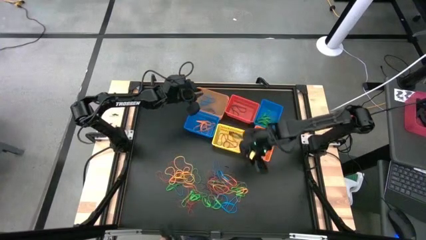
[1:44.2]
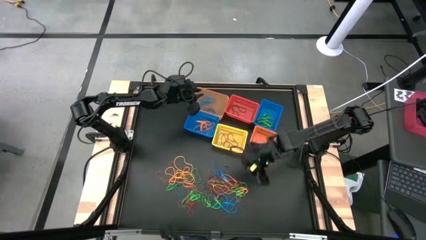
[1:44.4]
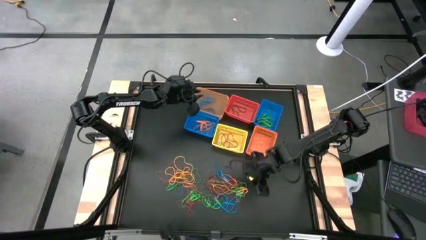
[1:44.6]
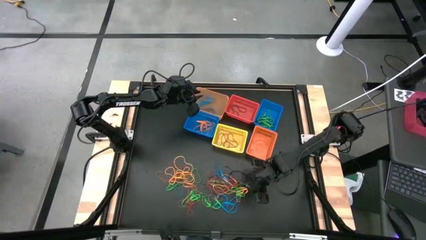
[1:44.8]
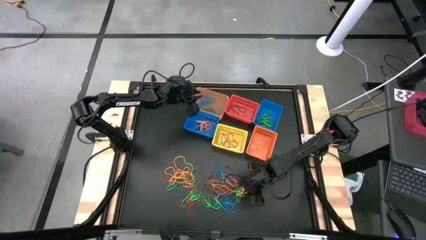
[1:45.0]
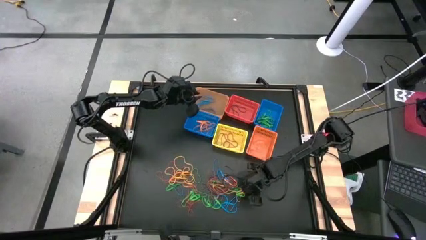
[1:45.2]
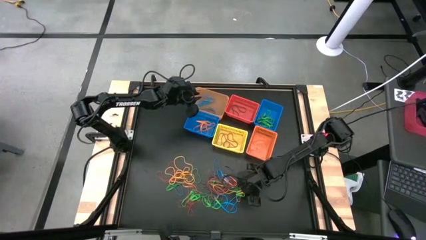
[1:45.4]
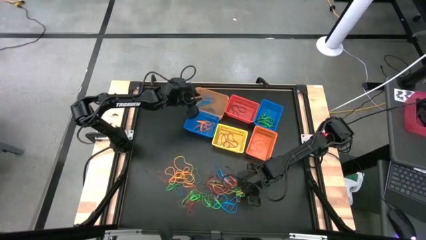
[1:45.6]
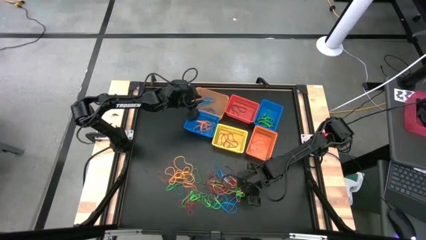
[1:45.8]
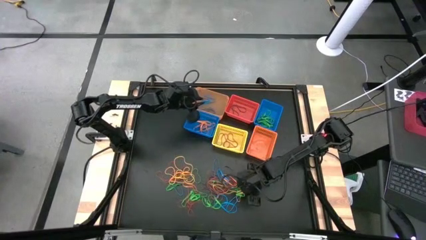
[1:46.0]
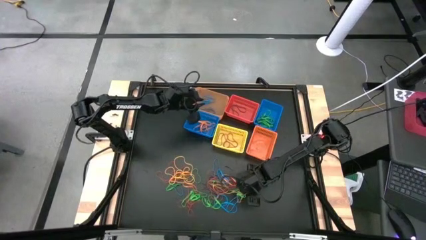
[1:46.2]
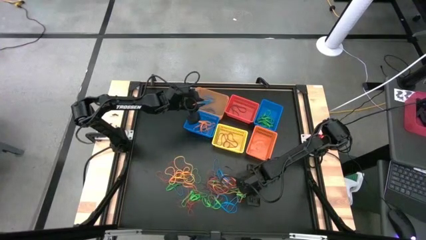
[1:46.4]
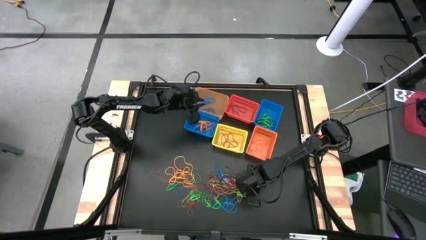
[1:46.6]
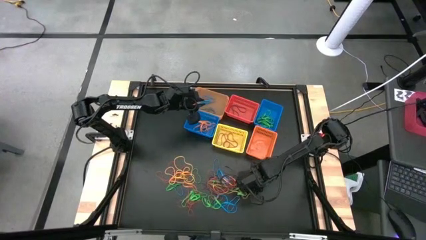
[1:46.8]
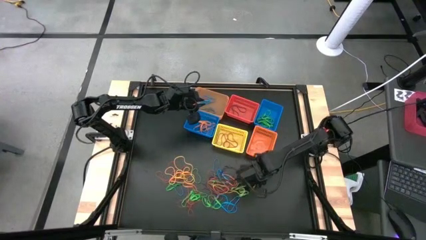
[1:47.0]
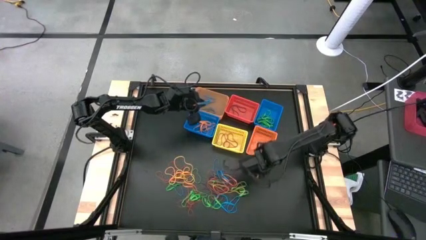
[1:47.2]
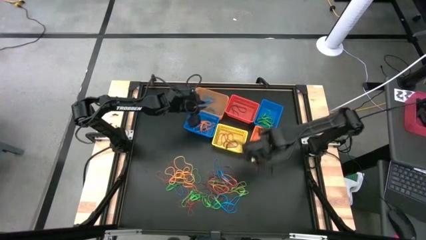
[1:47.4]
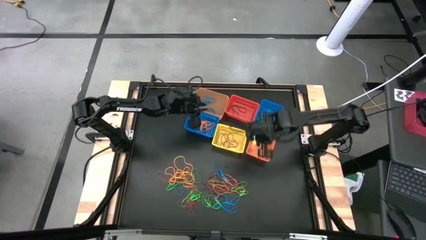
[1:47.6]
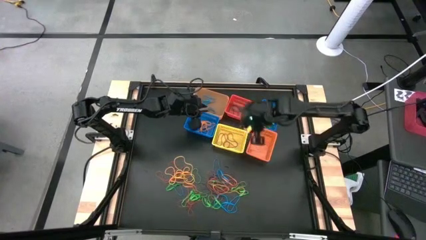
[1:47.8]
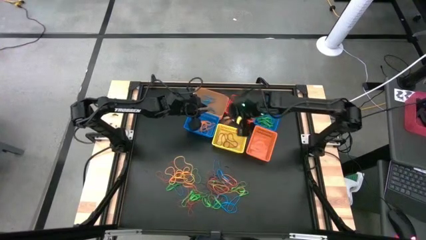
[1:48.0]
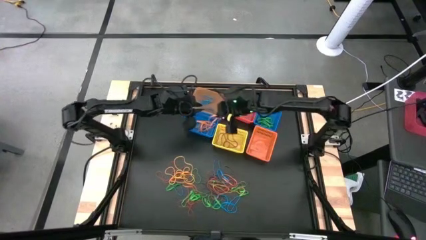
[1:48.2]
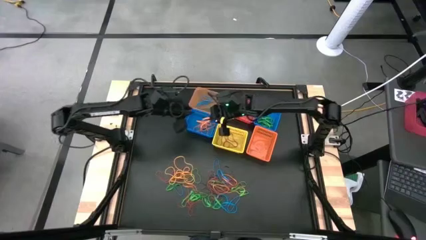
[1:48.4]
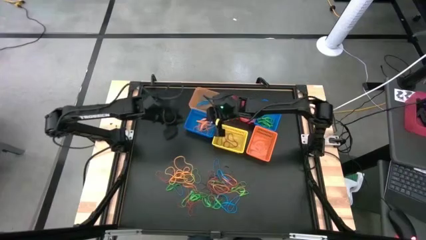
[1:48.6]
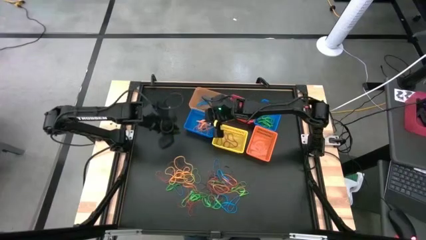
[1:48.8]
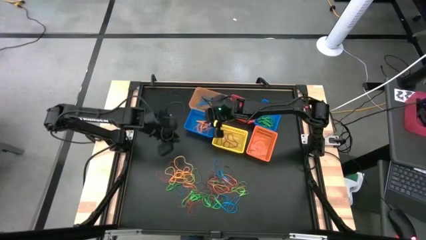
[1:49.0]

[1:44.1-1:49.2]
Task: Sort rubber bands into baskets
Put the orange rubber band into the left blue basket

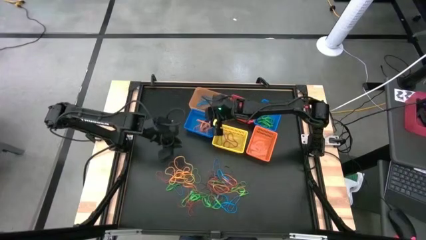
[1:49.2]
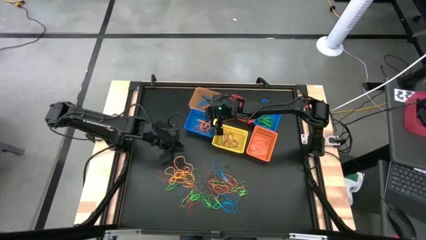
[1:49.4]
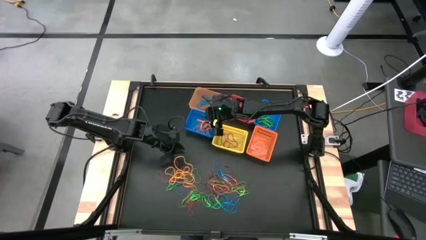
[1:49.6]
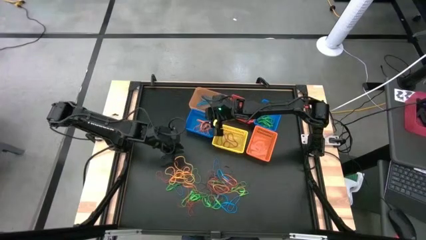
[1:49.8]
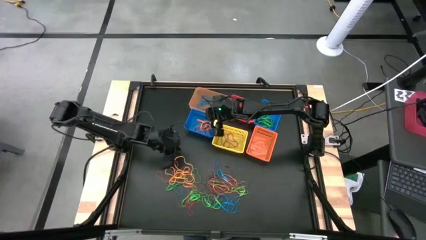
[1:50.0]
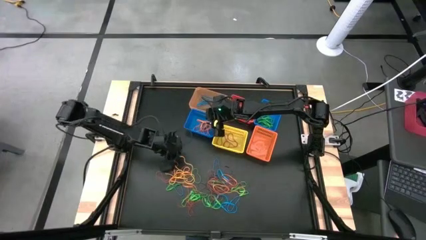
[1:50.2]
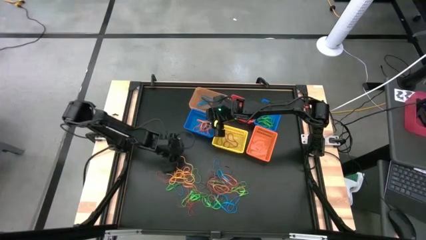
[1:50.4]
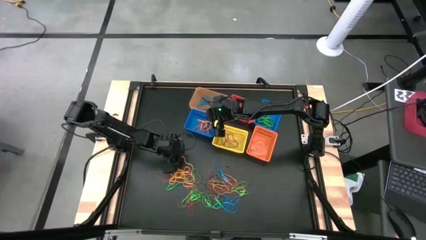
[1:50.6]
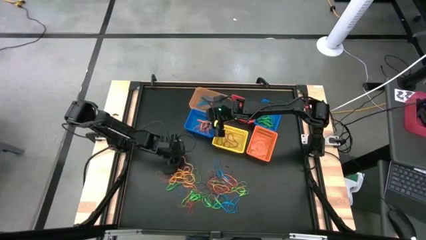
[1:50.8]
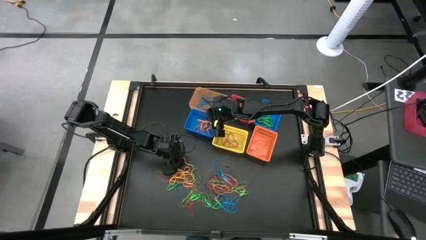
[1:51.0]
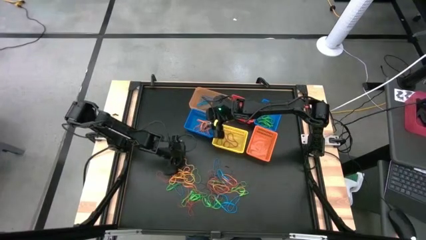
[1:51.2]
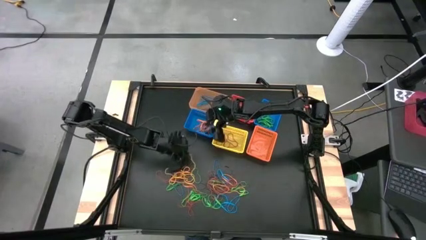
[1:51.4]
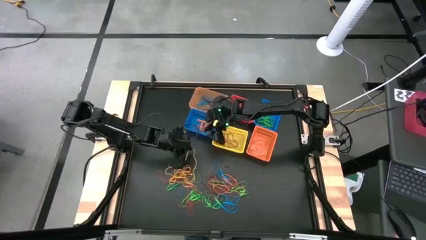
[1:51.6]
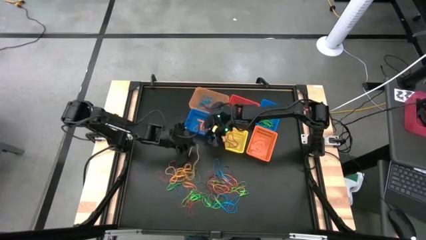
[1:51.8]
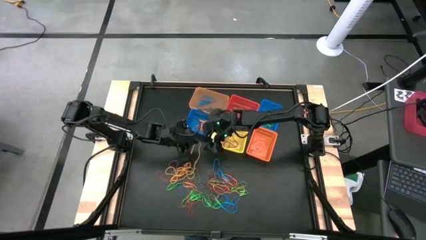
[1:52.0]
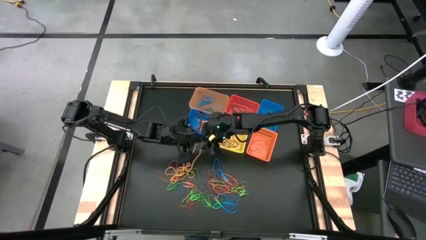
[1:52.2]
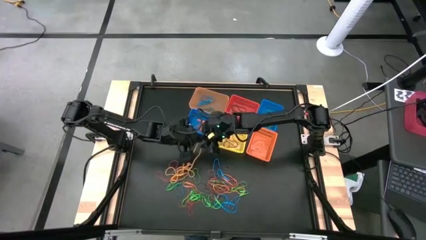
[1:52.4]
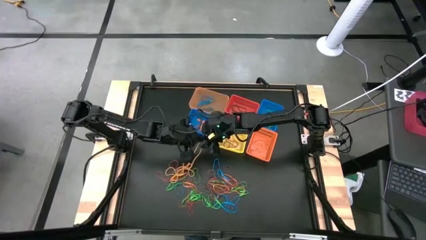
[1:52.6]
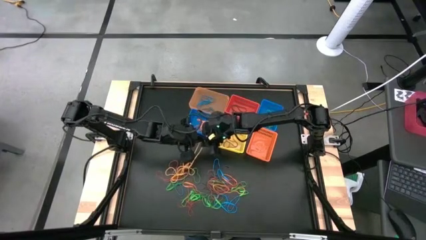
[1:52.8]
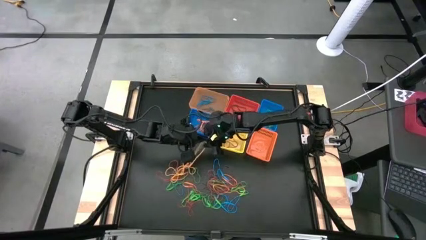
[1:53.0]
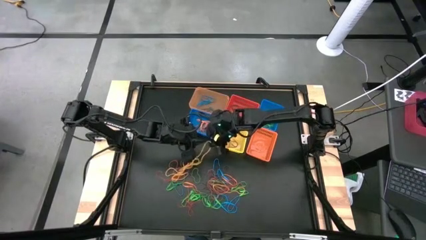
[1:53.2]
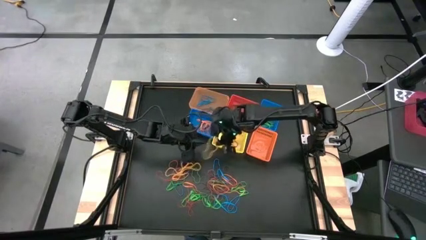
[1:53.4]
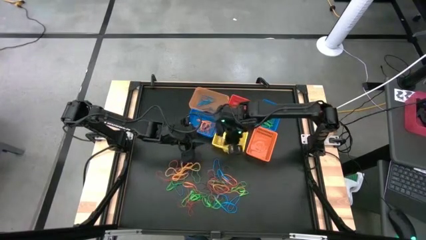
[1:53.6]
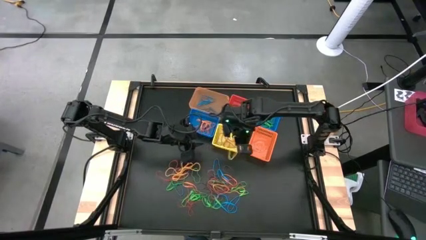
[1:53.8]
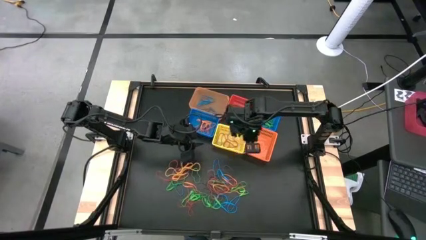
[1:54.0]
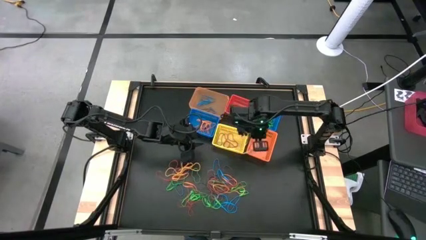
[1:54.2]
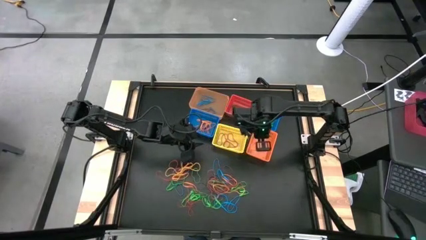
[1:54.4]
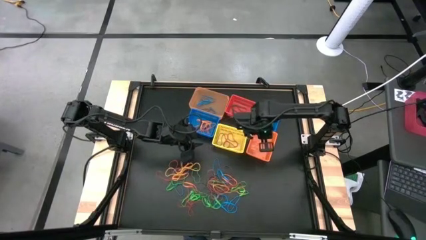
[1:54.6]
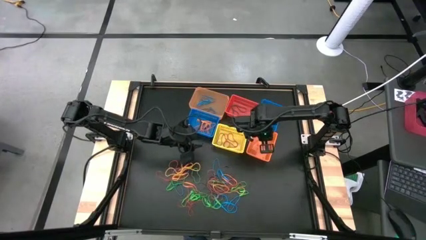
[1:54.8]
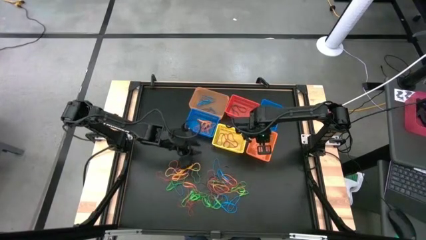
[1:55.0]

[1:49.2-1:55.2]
Put the yellow rubber band into the orange basket

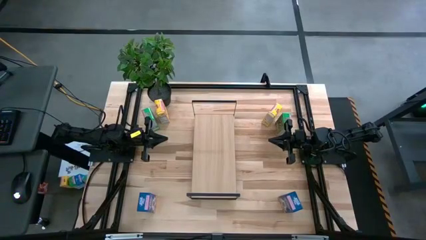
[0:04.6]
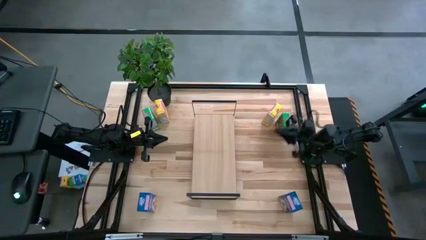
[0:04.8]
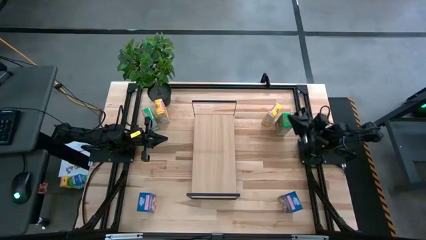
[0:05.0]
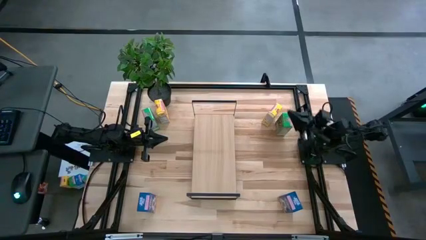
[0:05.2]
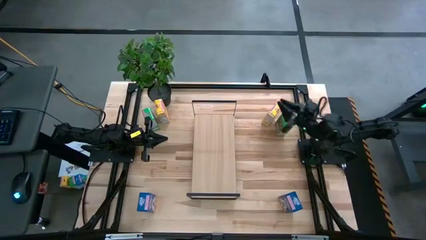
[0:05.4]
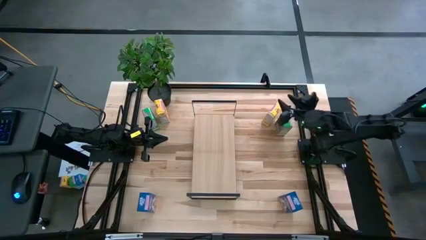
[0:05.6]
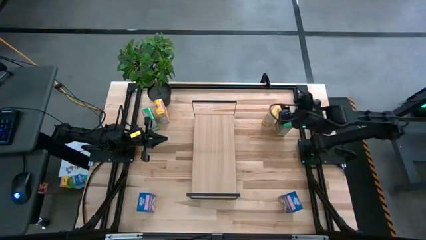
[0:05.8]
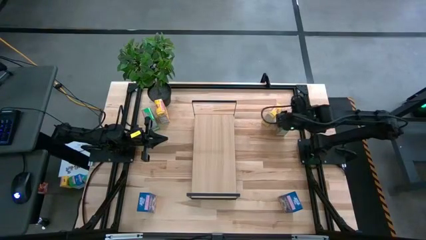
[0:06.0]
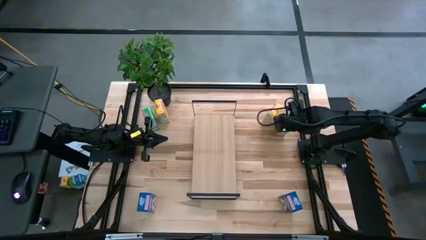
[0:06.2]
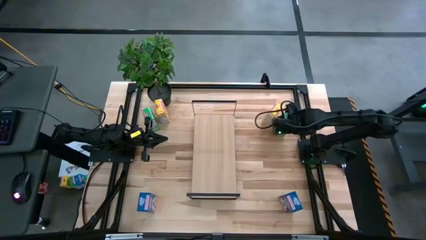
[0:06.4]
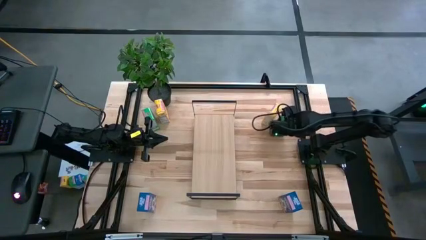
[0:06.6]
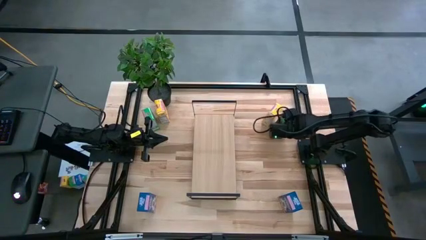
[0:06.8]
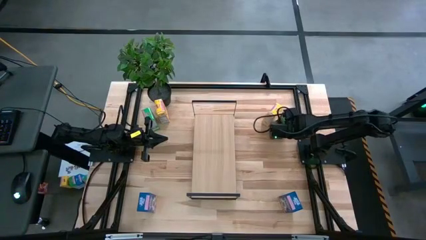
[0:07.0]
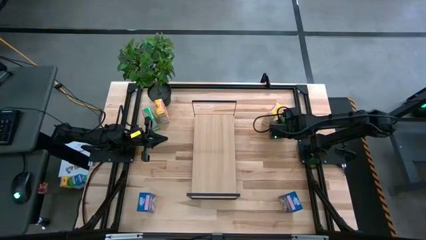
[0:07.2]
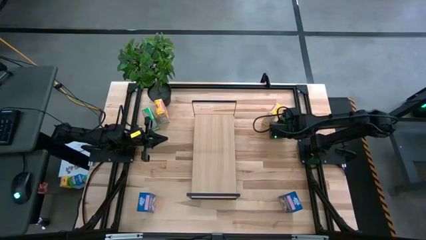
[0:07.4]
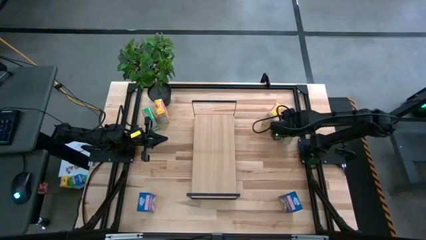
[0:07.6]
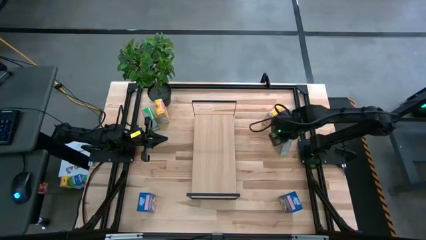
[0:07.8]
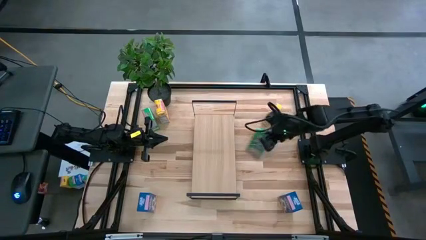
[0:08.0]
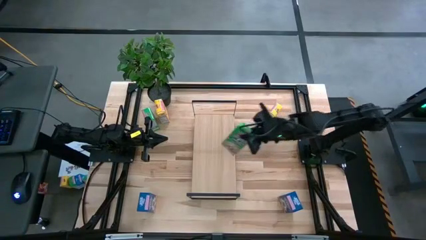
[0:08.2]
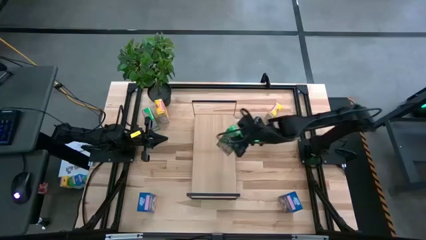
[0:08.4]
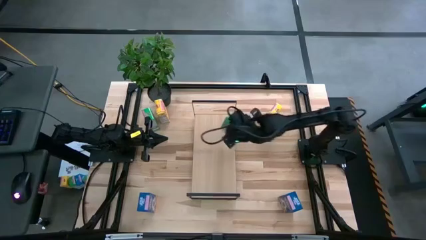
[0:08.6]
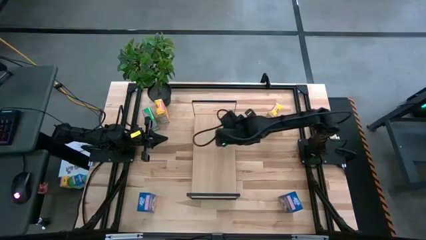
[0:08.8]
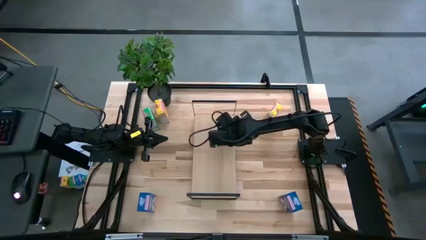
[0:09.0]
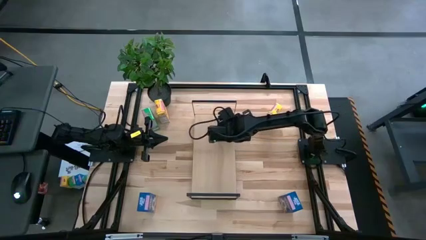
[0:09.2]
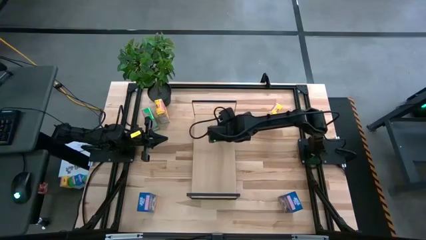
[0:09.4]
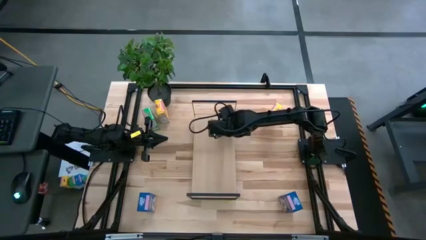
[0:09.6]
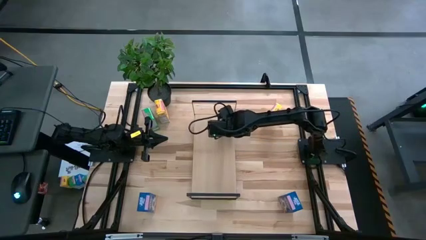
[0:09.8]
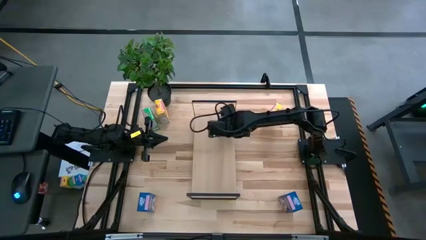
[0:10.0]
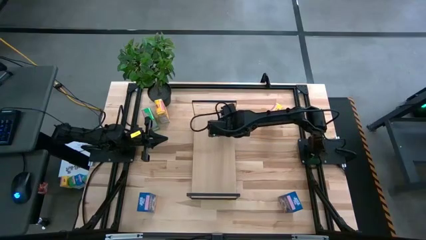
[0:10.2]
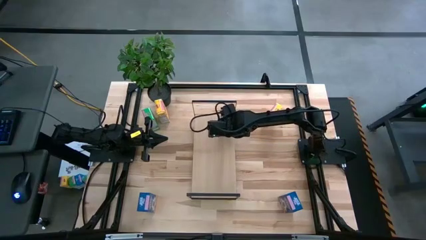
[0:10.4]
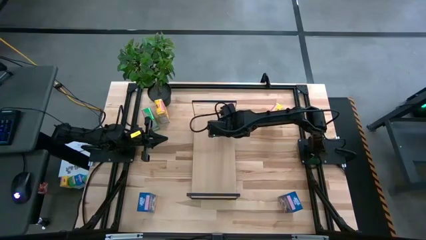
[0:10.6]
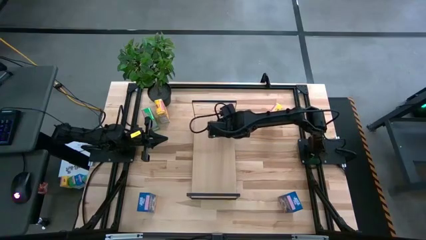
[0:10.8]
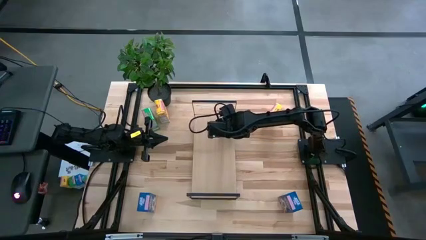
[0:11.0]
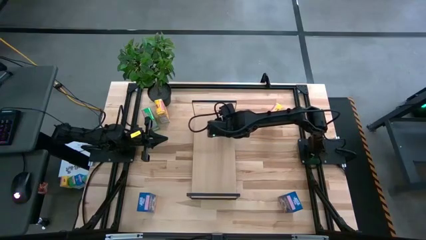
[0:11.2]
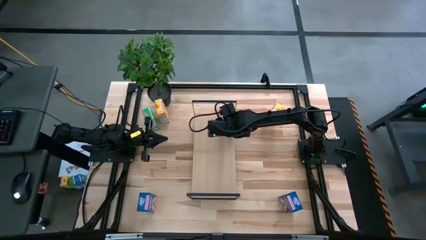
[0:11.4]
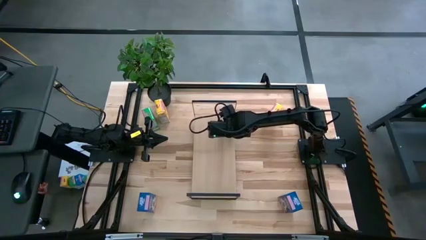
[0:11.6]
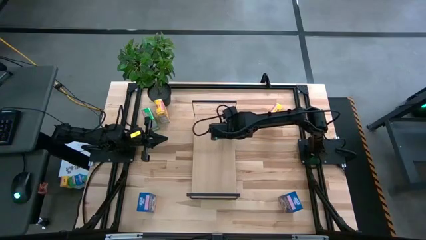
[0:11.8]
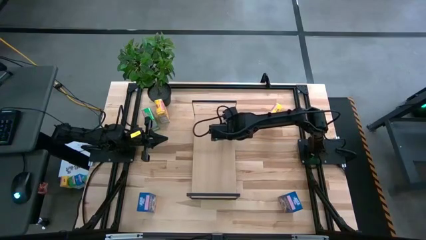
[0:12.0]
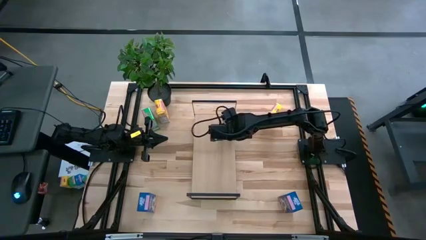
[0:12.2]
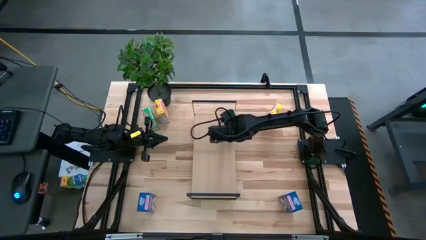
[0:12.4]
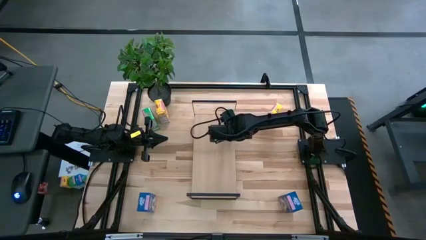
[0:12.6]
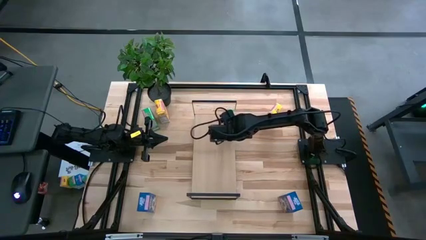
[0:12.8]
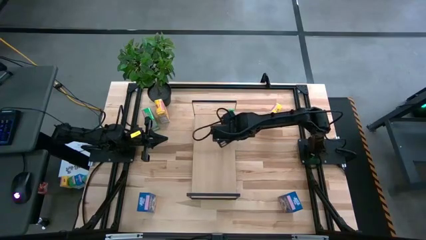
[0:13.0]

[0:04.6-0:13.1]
Task: Stack cereal on shelf
Put the right green cereal box on the shelf
